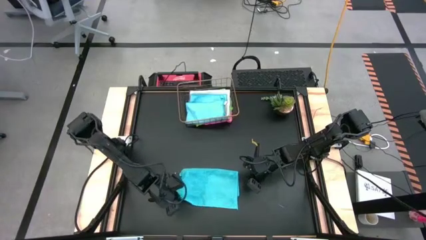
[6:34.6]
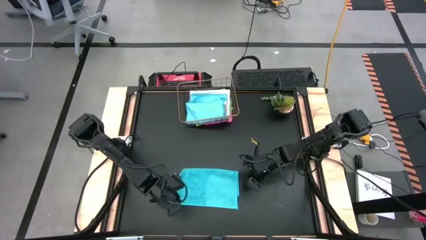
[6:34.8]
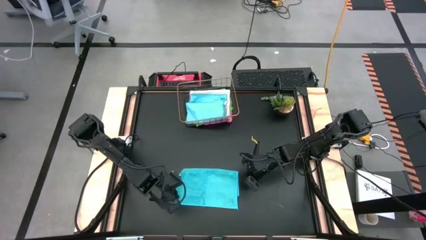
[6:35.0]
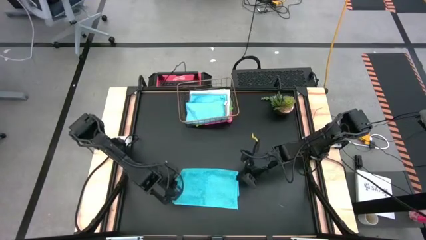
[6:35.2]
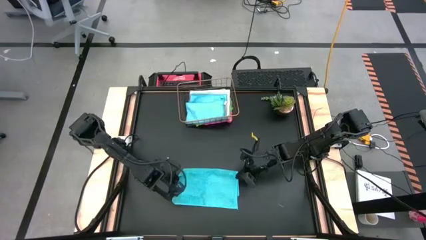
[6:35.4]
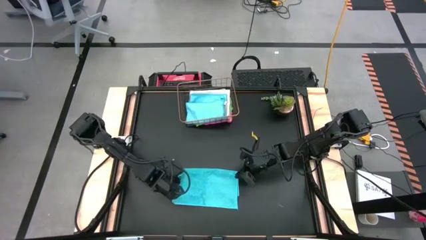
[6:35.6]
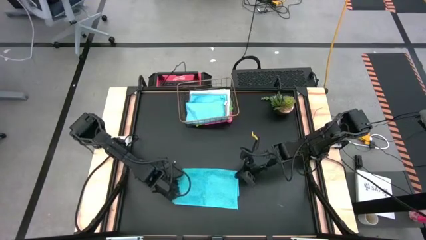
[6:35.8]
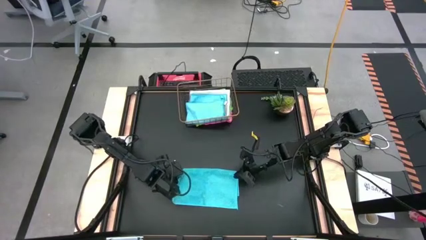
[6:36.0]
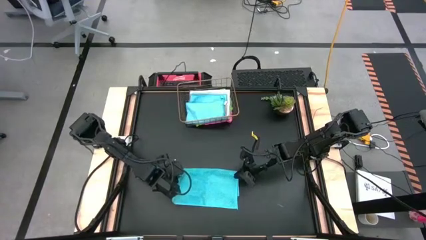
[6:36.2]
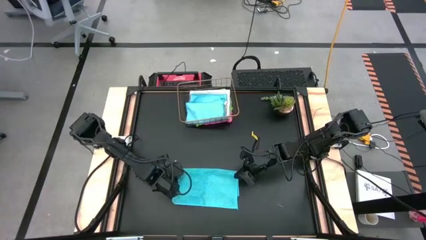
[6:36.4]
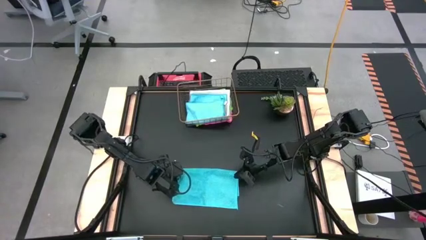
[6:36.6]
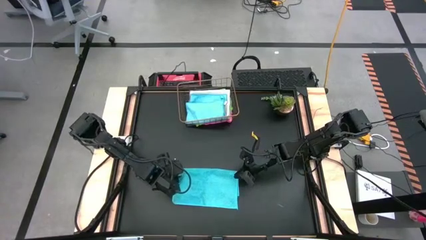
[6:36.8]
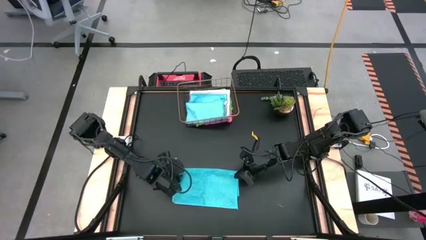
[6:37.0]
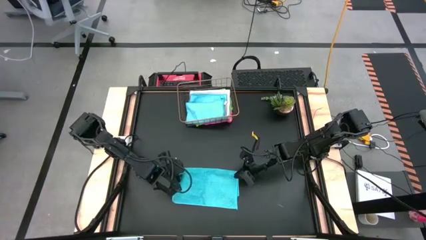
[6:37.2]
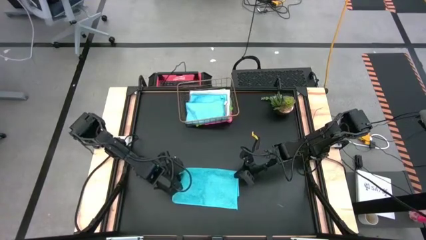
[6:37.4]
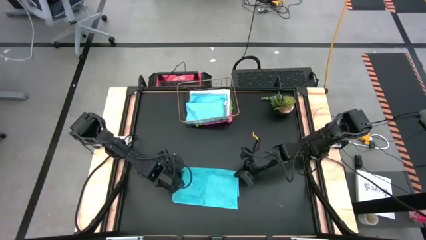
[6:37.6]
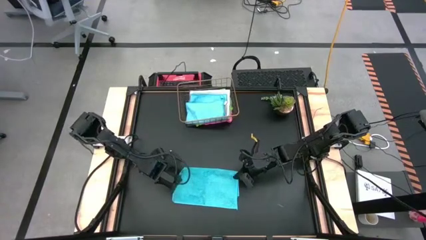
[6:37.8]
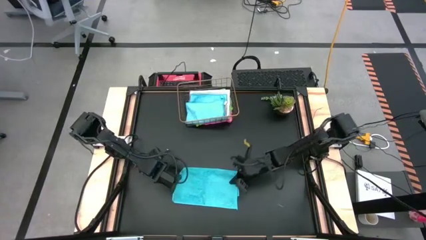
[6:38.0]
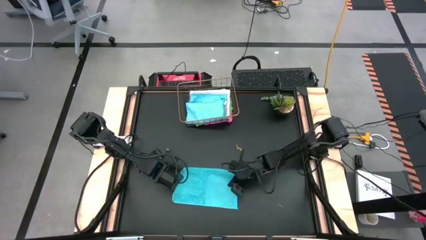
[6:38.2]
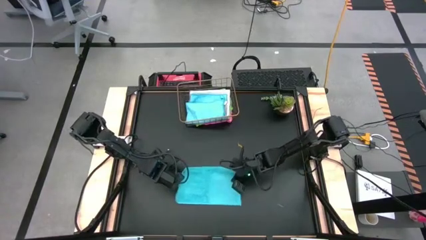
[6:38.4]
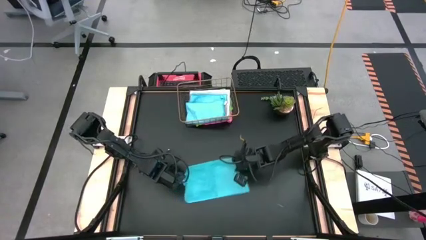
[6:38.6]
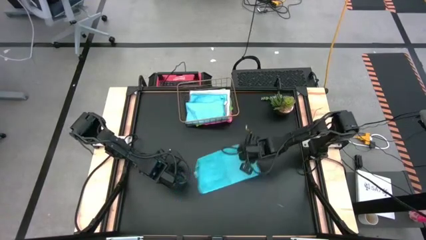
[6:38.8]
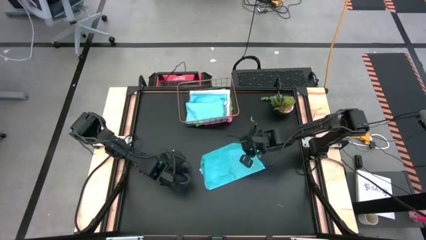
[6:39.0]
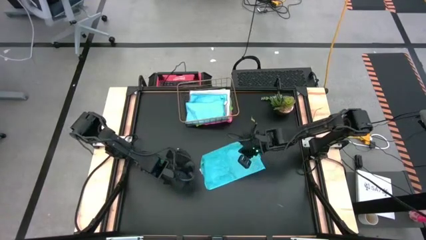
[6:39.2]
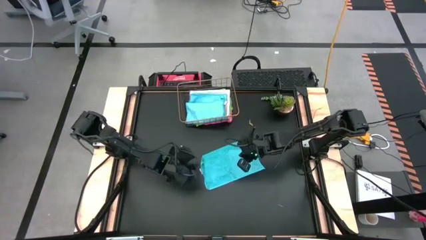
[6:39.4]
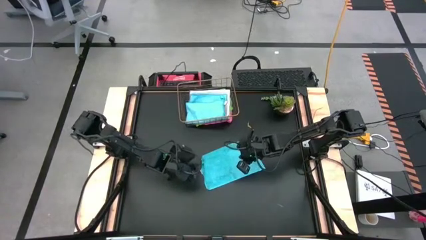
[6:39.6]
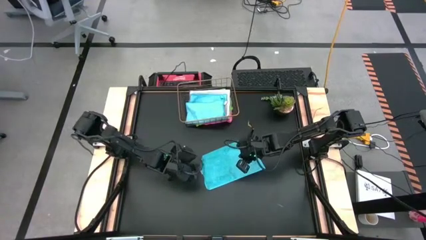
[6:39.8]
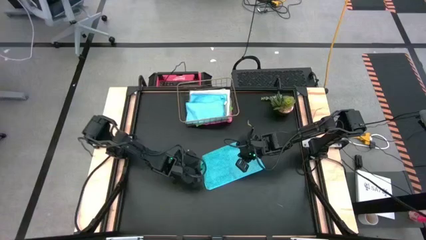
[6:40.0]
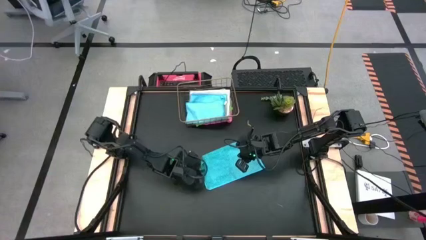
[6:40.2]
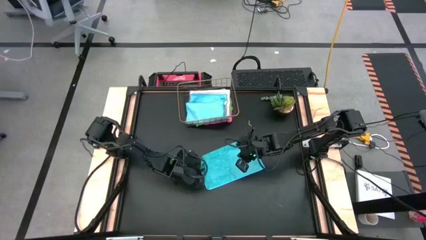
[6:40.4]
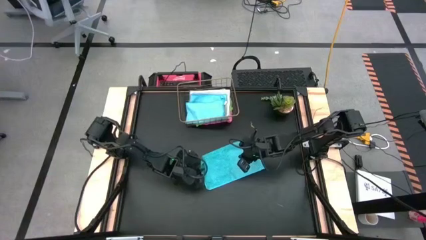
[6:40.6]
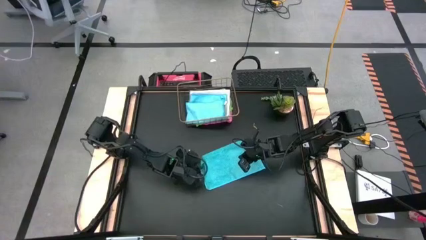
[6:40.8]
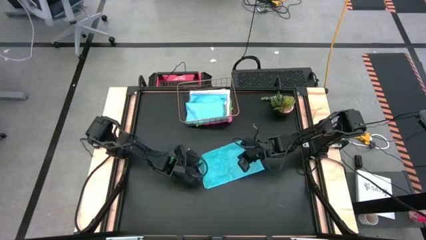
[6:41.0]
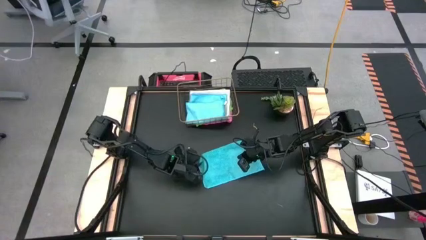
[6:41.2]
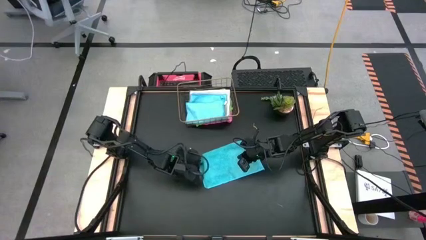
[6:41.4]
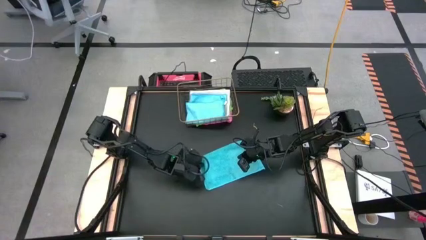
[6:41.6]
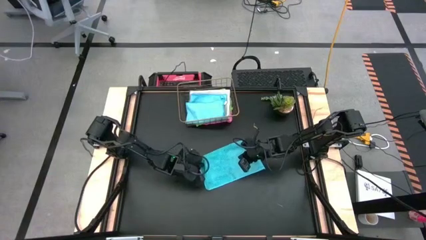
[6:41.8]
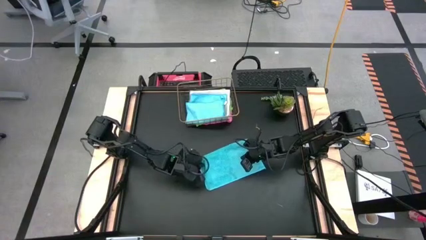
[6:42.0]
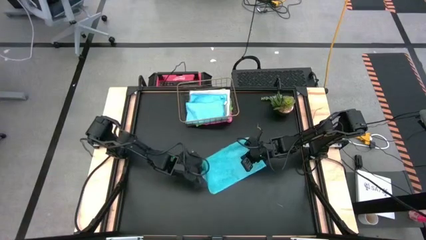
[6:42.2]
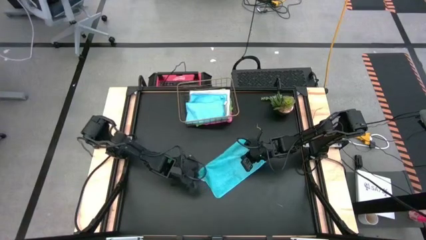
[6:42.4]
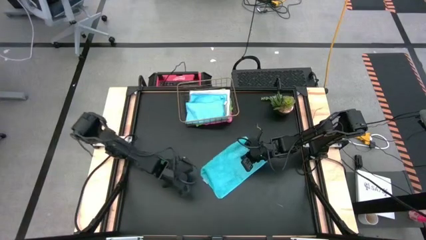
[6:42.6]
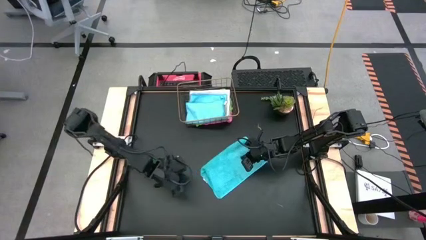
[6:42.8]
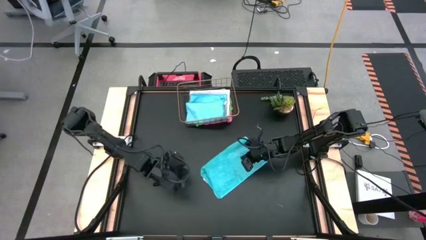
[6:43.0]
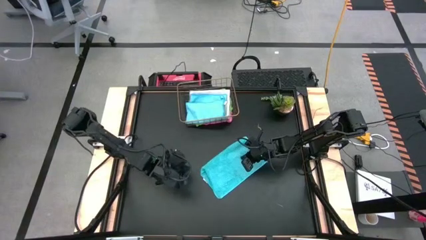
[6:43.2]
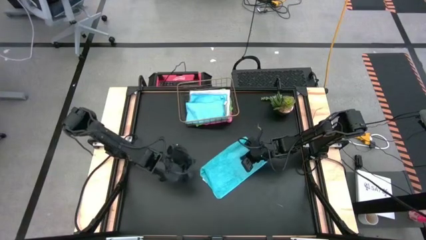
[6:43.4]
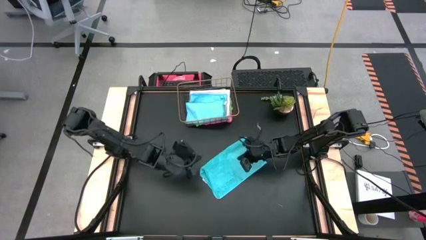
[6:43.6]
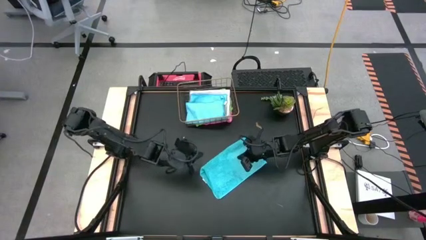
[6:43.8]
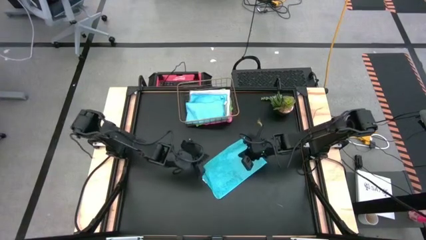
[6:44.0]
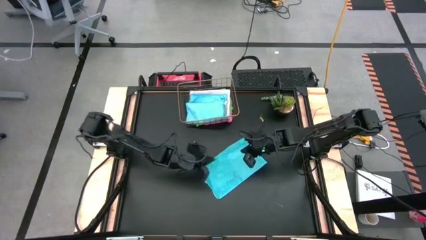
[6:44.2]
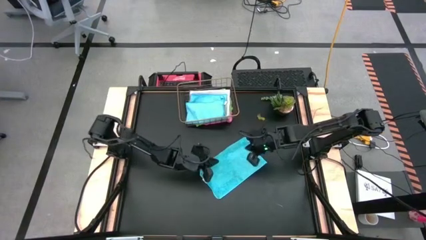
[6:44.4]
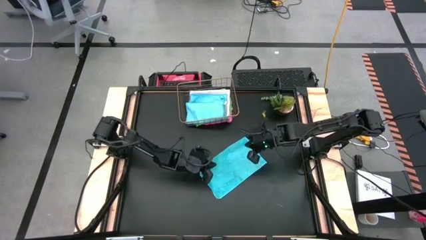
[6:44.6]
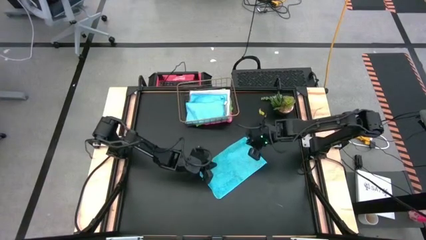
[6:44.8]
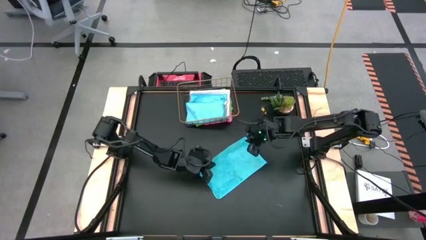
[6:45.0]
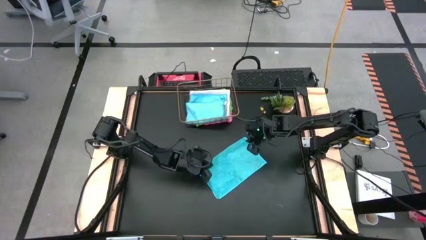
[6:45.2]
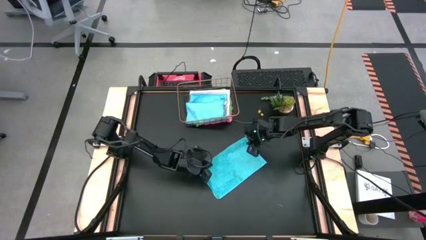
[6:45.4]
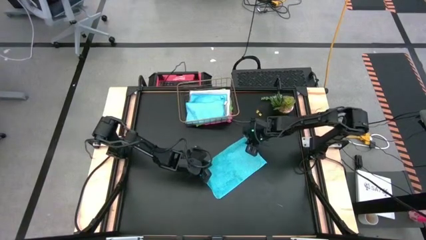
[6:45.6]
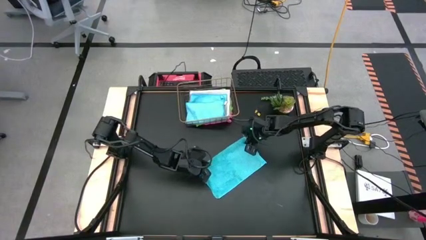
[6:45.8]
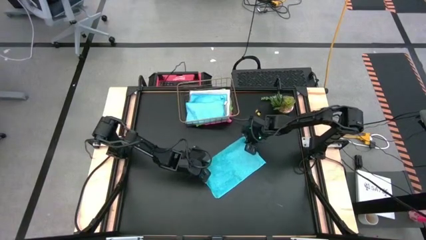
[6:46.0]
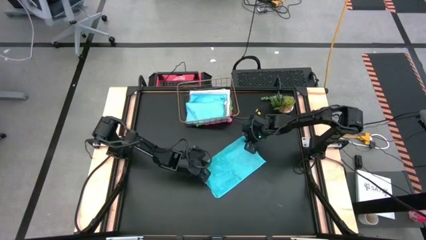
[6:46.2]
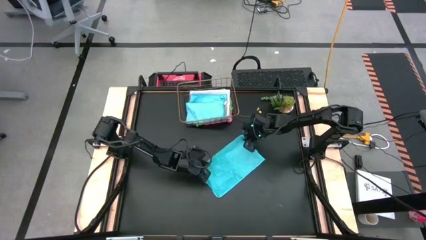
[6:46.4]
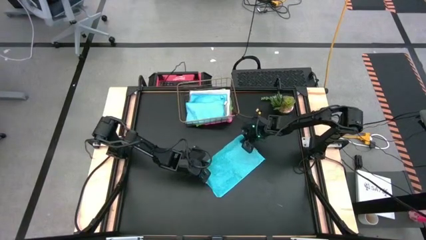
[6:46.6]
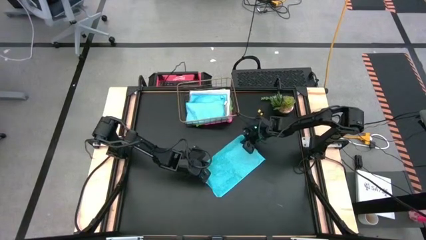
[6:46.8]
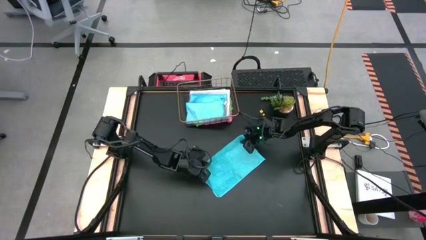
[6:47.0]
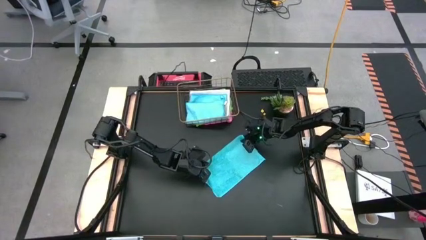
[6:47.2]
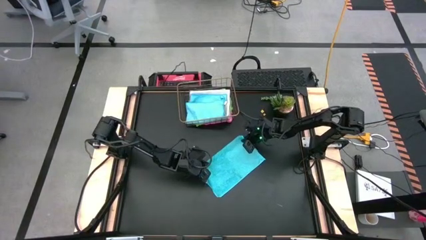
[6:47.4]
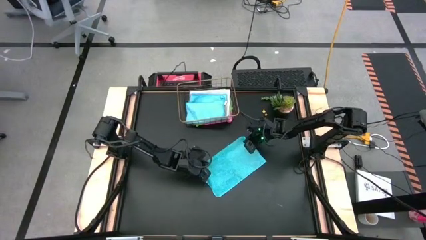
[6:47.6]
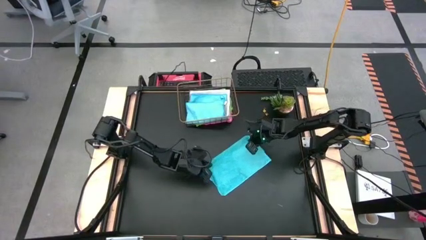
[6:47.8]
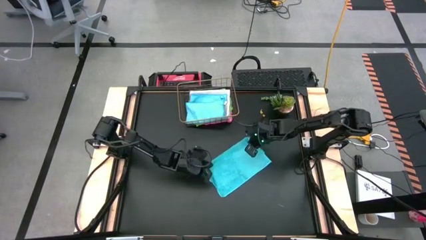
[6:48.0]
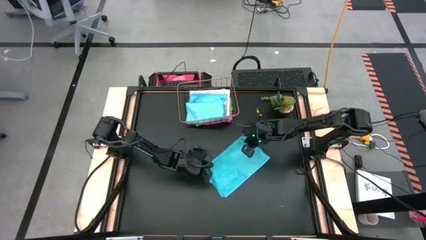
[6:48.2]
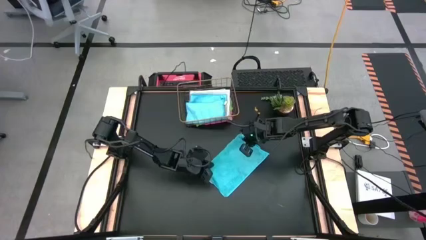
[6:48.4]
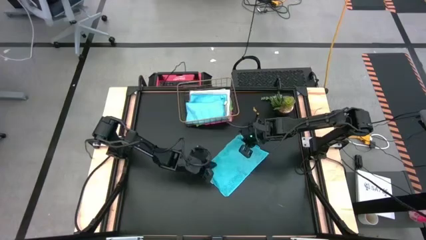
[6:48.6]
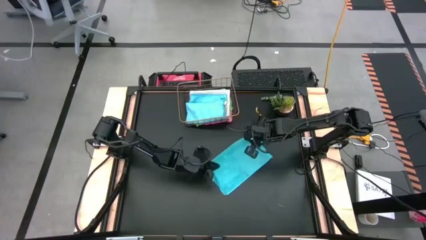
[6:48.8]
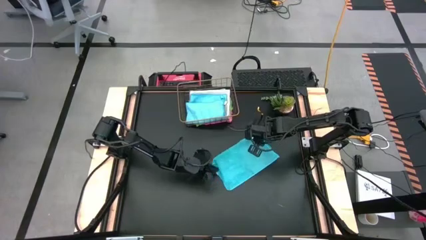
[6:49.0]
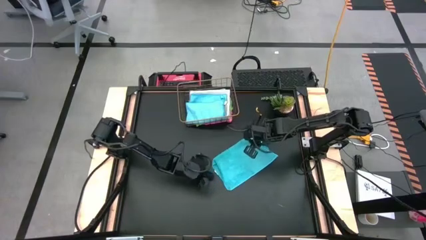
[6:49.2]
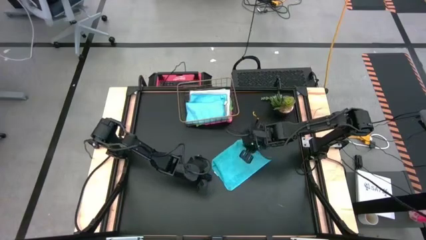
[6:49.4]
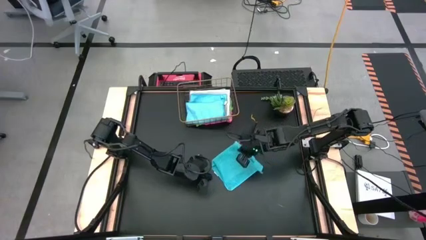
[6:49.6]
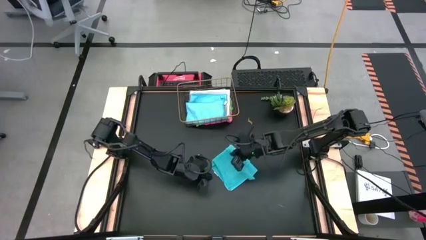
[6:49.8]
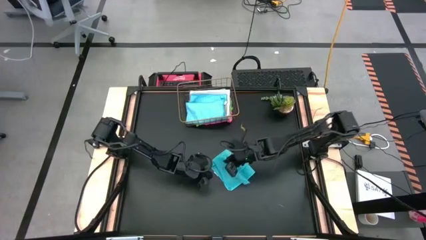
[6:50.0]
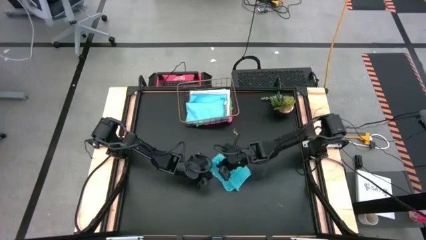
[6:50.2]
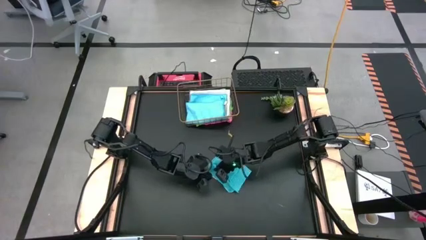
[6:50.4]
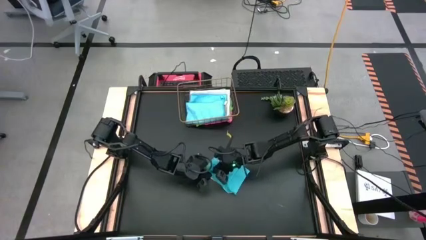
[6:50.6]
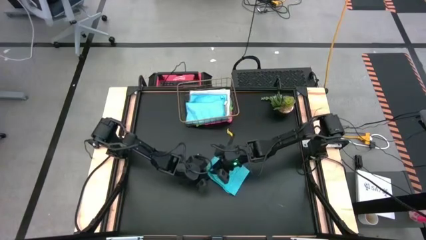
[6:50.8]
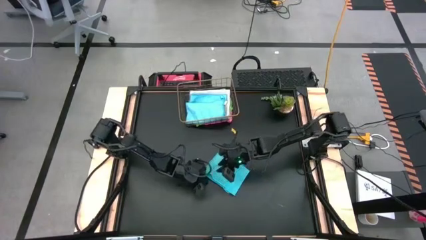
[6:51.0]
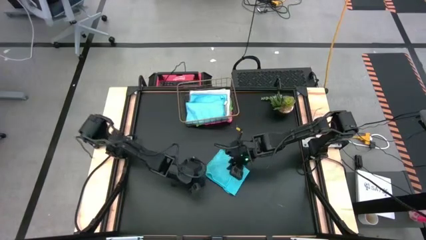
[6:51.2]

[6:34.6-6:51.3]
Task: Fold microfiber towels
Fold the light blue microfiber cloth in quarters
